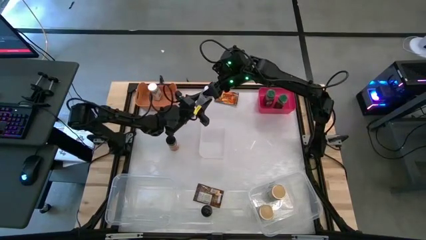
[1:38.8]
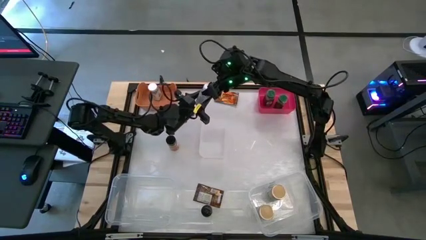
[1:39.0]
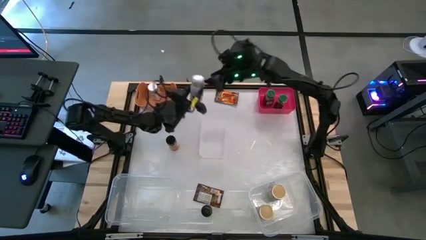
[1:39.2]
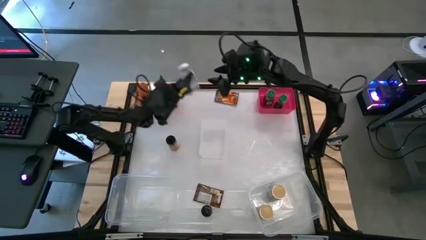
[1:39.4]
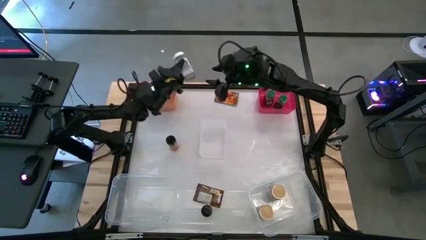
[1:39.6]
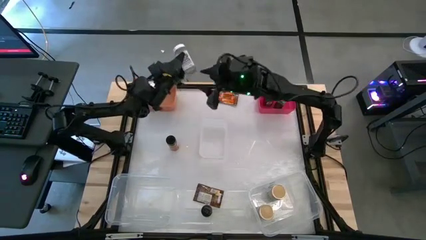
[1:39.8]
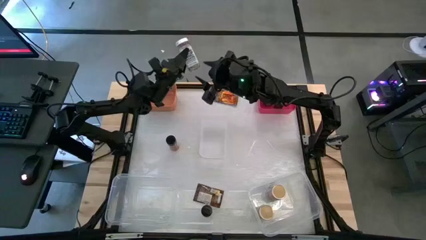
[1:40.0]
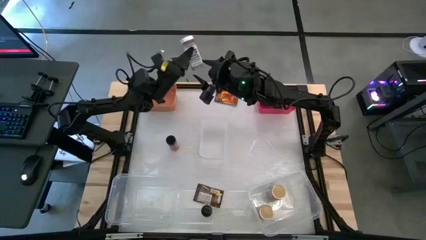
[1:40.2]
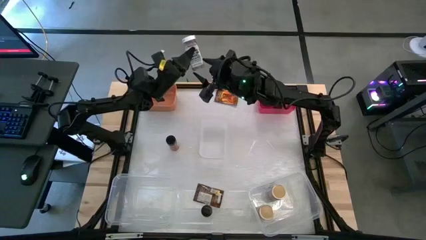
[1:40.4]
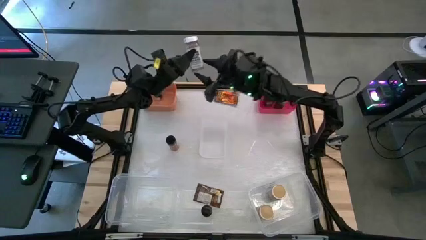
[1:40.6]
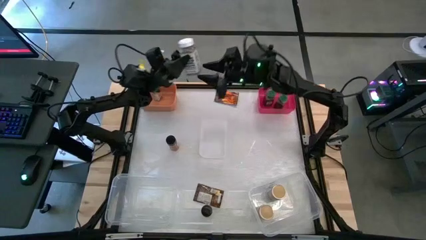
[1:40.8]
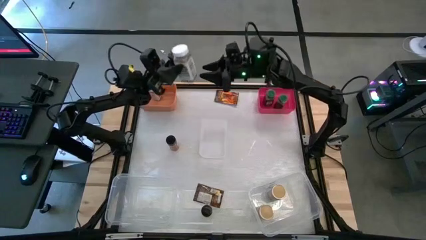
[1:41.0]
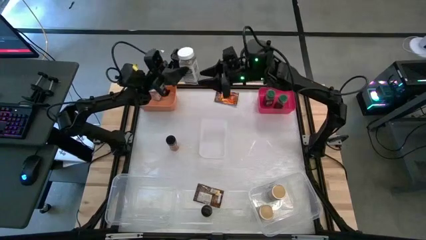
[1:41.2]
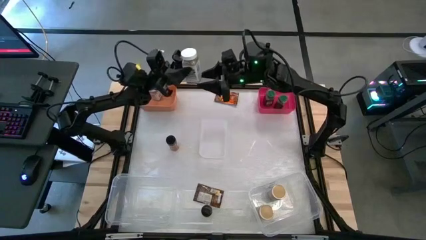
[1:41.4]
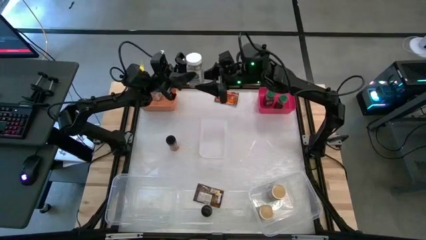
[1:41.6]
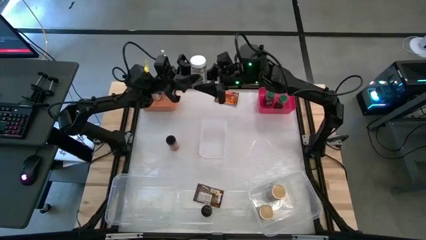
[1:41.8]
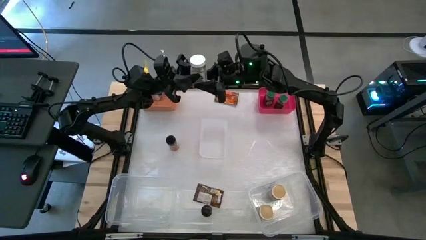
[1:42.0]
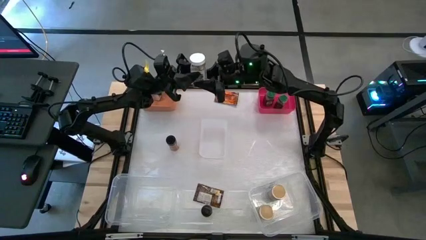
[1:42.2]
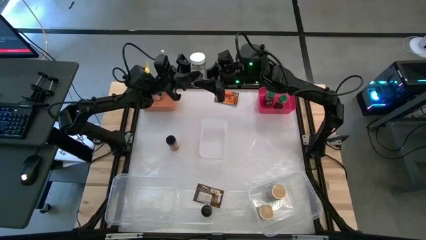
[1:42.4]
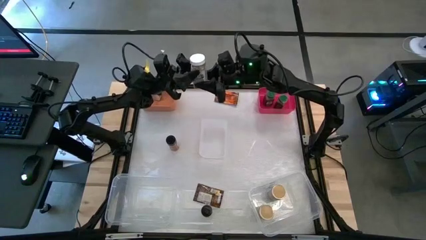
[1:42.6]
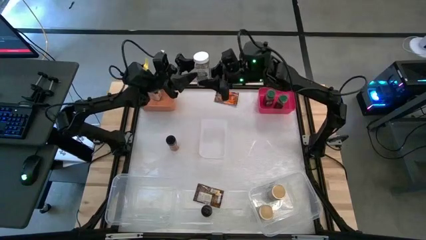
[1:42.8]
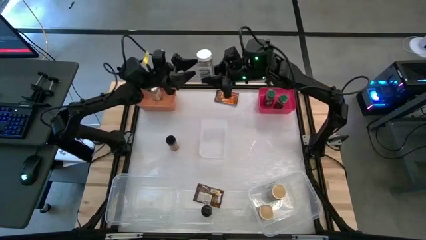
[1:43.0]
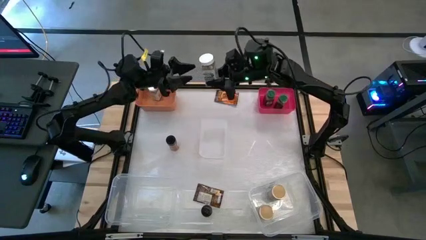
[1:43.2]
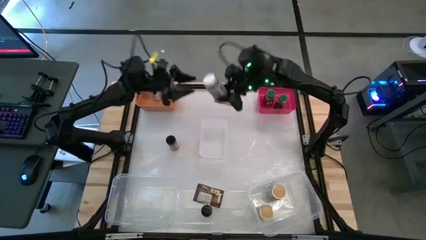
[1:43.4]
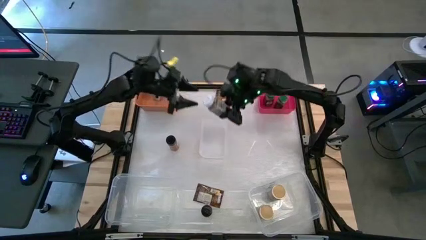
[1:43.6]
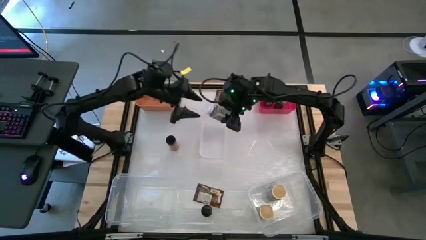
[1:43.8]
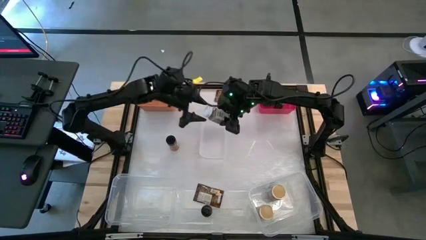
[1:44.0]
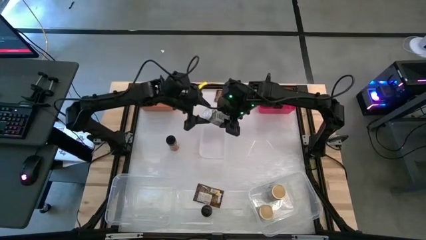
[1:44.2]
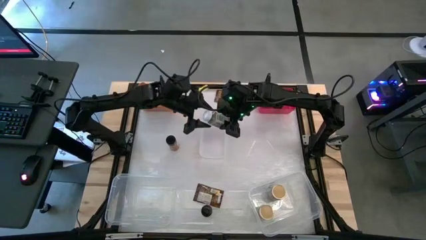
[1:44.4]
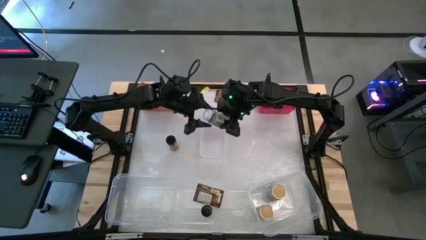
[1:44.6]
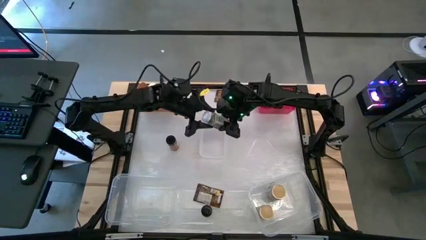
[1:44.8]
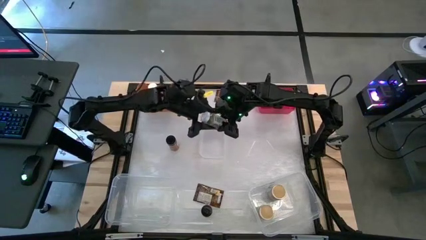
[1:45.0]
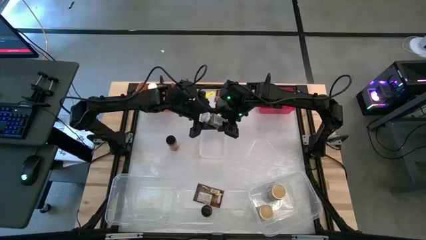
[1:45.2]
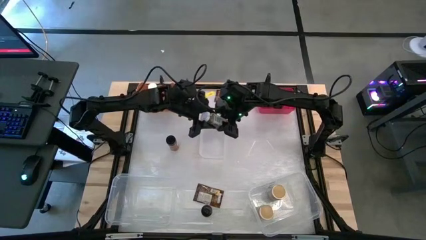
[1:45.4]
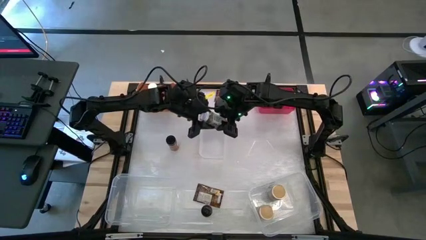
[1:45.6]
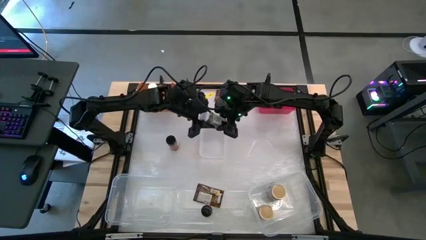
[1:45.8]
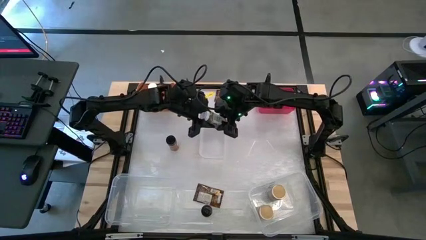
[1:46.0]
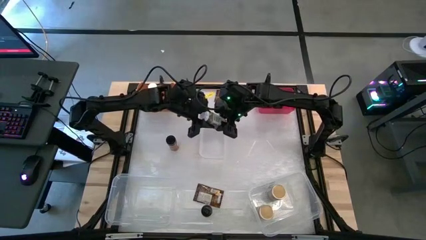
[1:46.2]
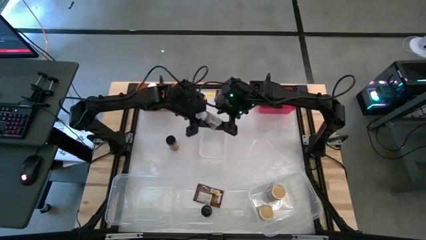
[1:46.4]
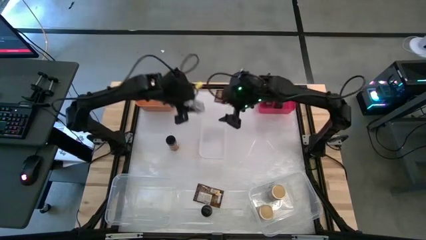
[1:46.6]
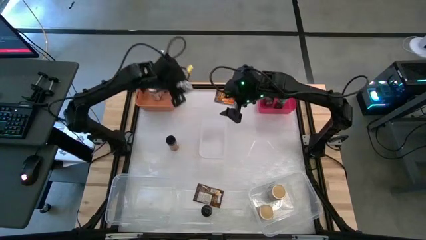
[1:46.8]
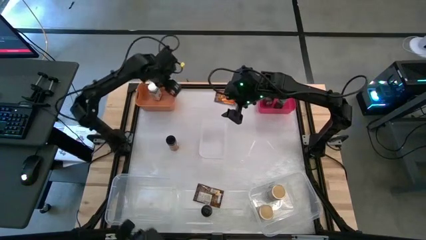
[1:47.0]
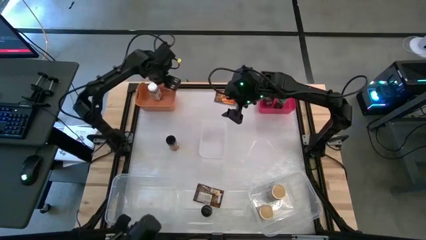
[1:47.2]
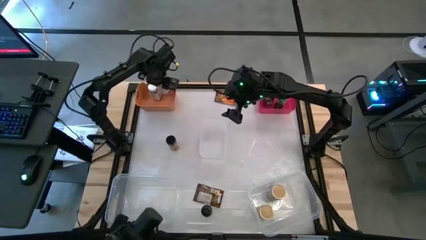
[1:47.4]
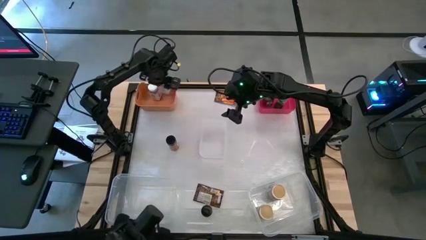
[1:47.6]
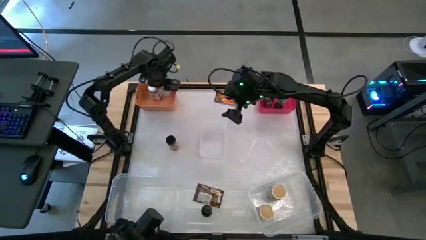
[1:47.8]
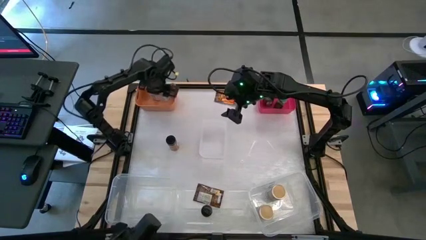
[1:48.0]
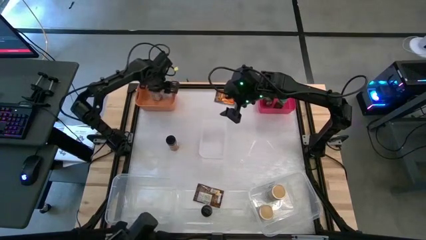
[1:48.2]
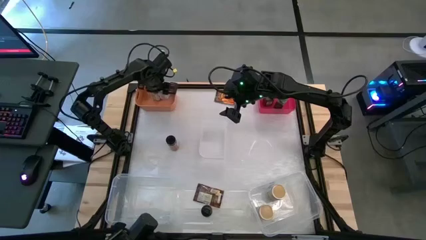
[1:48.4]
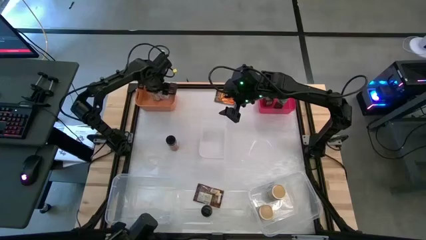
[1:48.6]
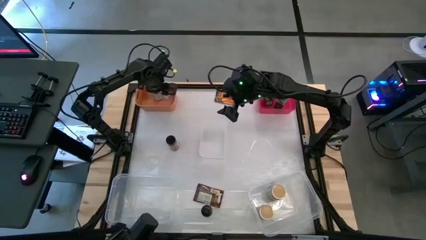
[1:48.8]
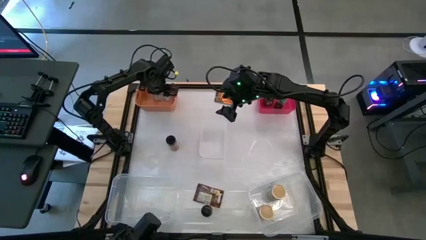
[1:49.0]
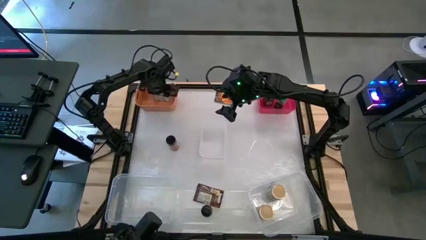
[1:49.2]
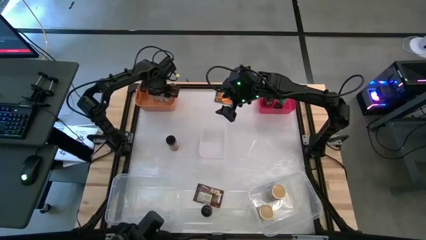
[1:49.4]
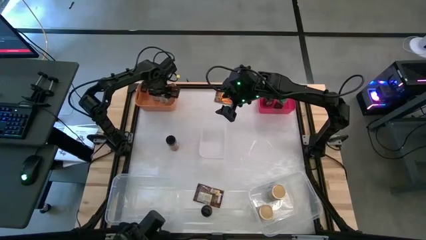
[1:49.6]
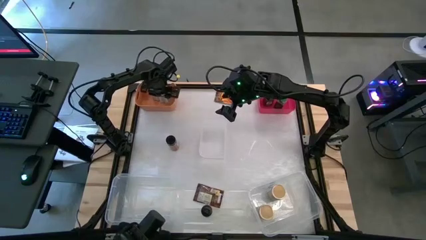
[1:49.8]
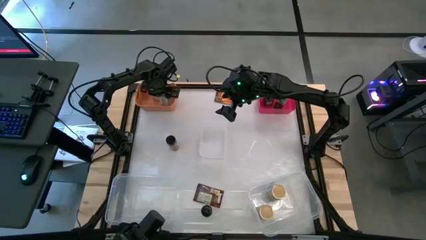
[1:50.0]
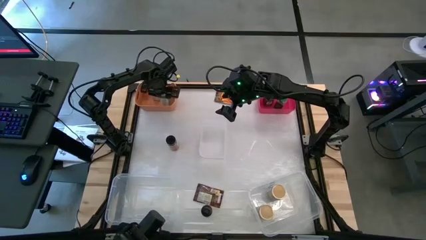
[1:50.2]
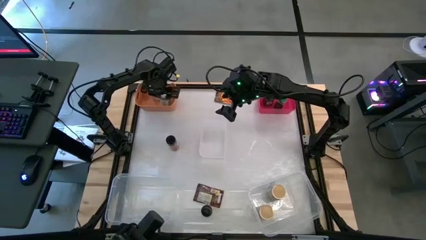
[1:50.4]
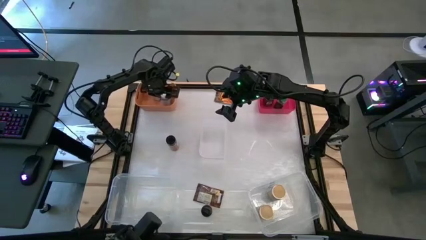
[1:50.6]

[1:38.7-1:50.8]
Task: Sort spices by type
Put the white seasoning bottle into the orange bin

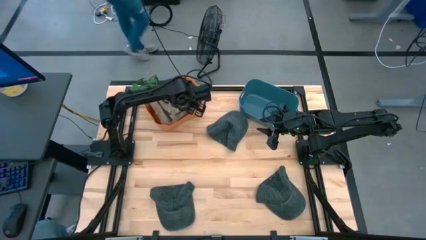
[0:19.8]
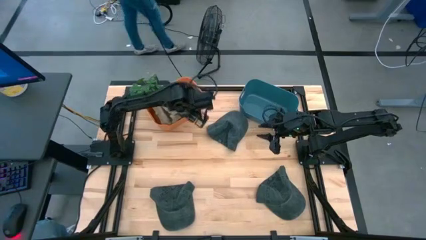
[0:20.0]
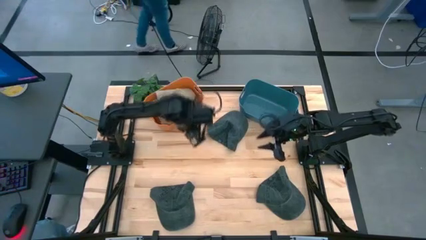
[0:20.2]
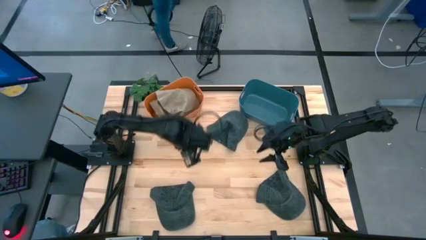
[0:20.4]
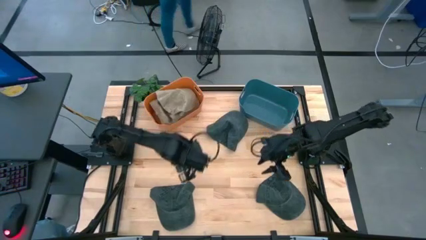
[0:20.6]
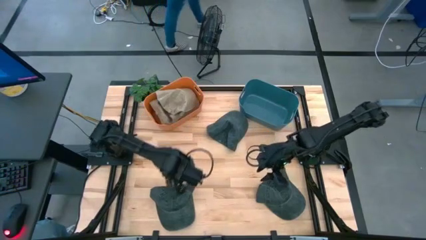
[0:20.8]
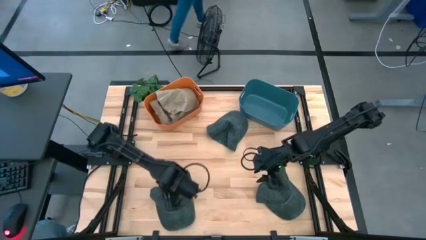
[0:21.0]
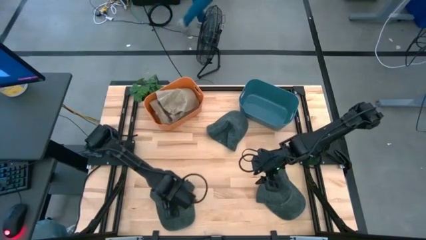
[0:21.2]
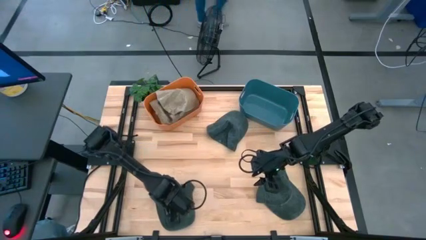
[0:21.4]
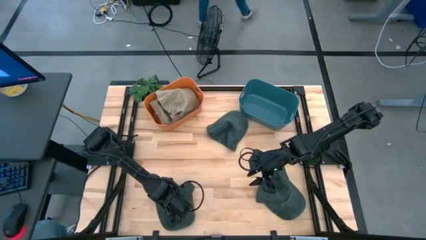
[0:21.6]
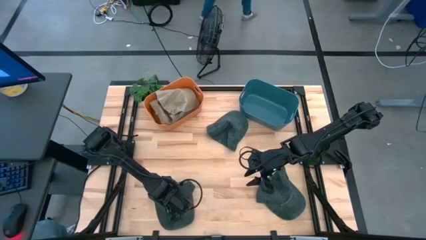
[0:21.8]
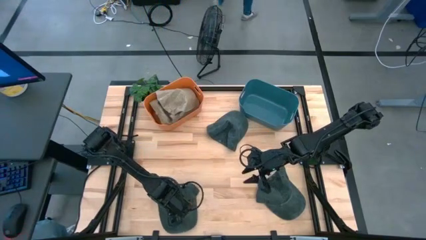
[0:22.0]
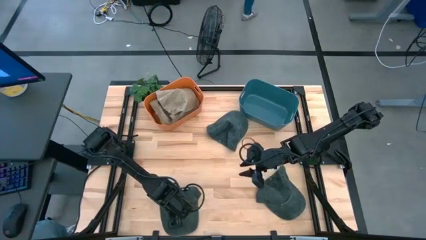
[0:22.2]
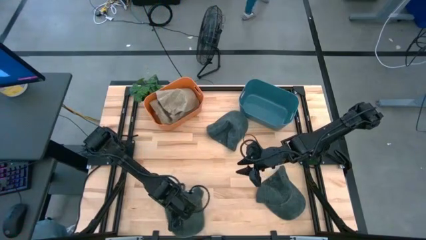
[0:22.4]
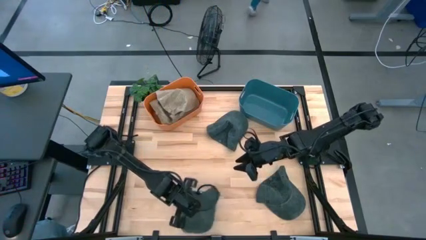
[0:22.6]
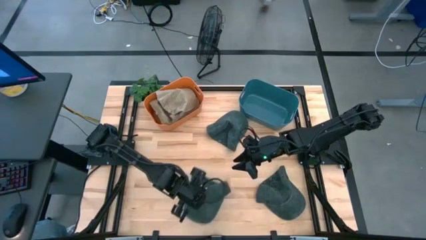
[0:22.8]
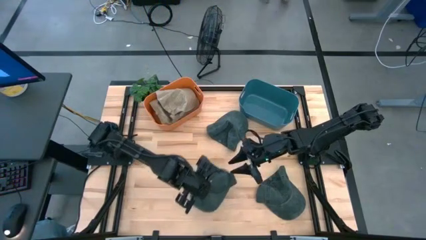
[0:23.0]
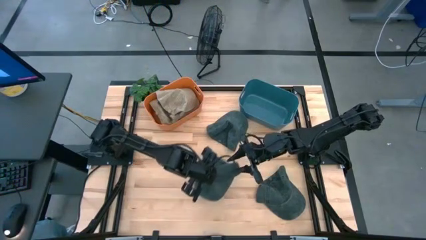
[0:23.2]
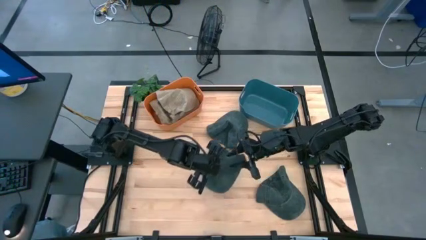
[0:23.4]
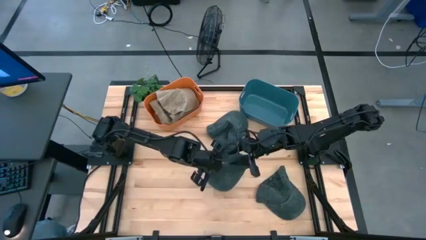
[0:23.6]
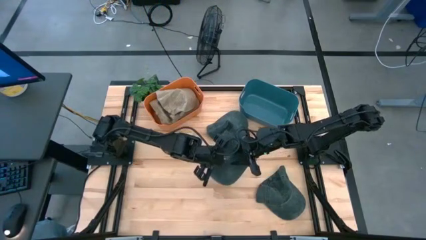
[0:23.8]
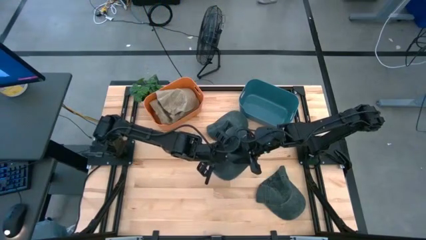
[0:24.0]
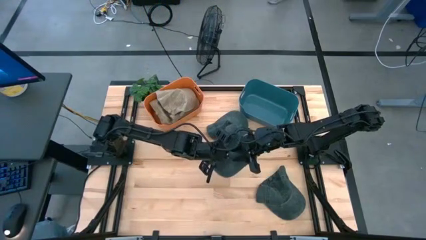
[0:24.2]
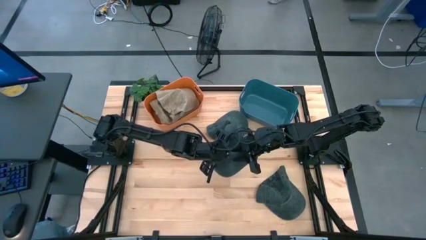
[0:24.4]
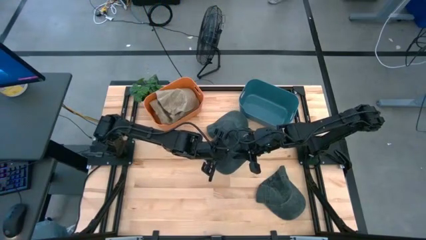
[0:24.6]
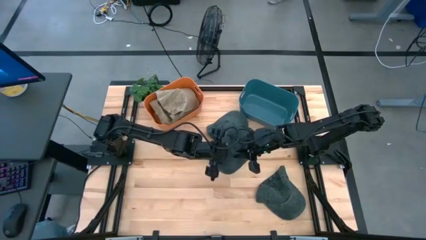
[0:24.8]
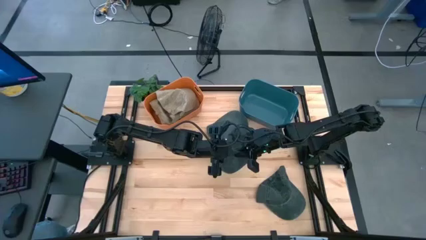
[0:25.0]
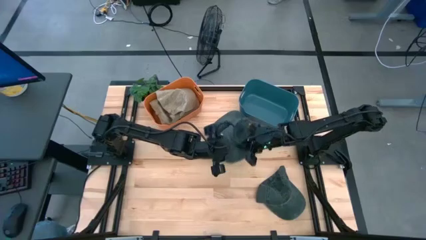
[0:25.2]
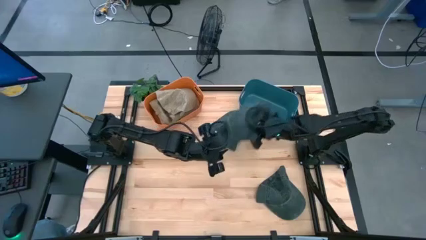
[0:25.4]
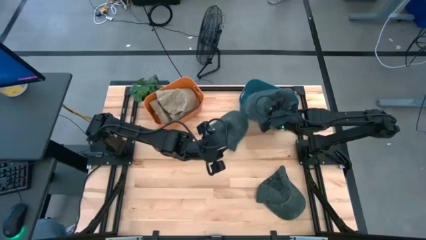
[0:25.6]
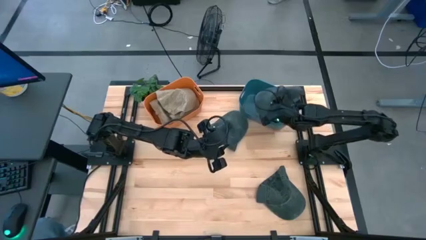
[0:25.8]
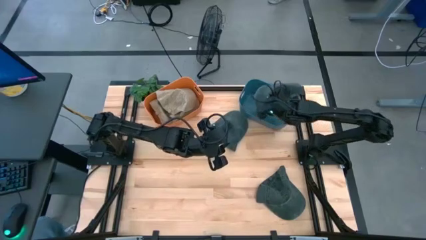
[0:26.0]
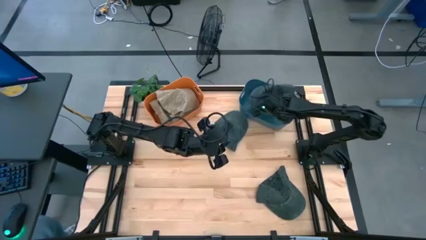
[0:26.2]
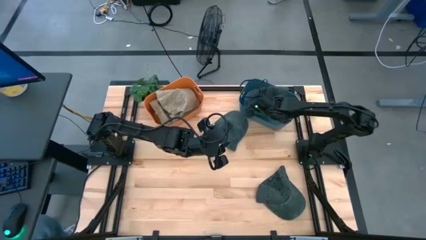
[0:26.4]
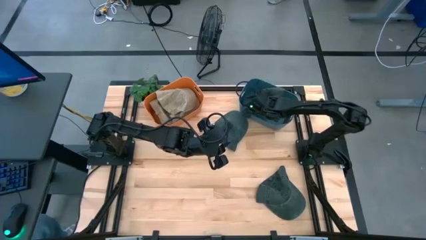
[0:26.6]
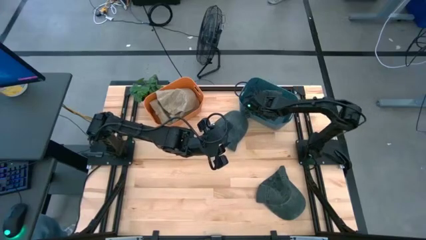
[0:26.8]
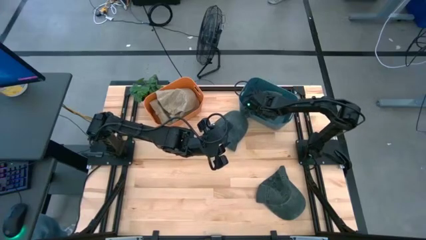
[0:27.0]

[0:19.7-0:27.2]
Task: Pick & Place hat
Put the bottom left black cap into the dark blue bin
